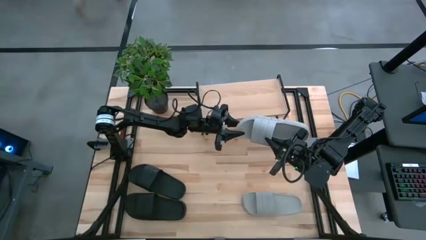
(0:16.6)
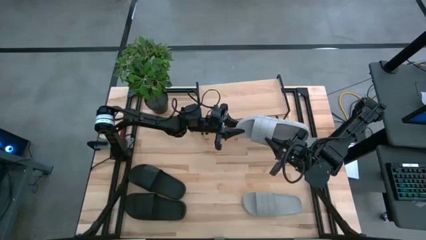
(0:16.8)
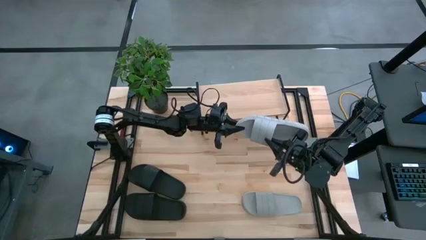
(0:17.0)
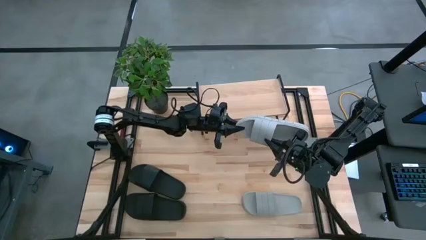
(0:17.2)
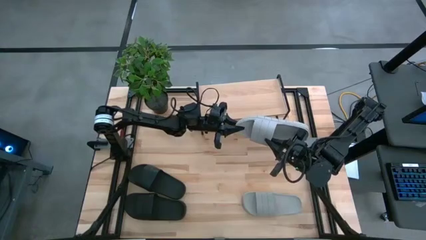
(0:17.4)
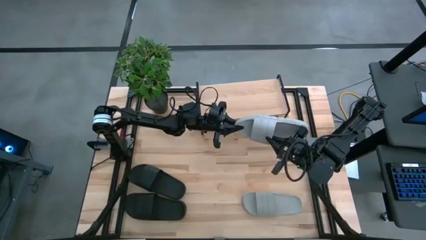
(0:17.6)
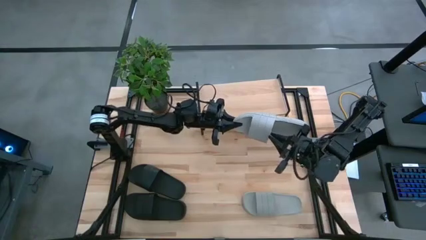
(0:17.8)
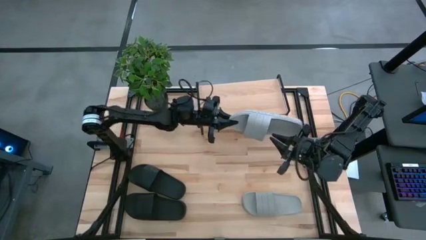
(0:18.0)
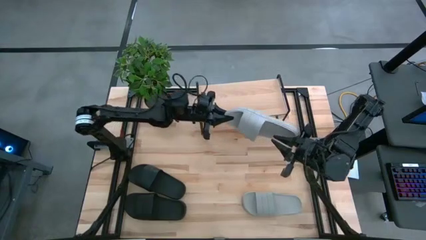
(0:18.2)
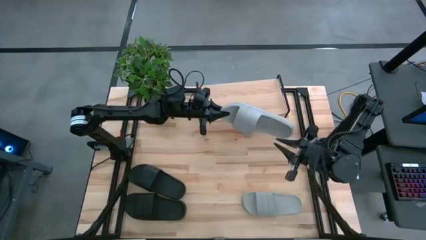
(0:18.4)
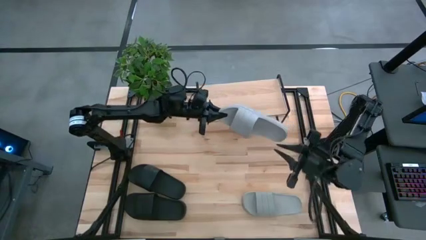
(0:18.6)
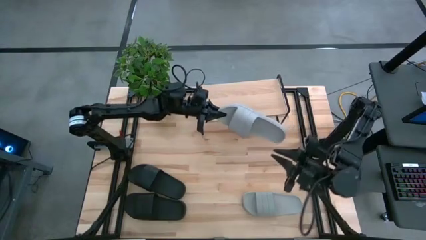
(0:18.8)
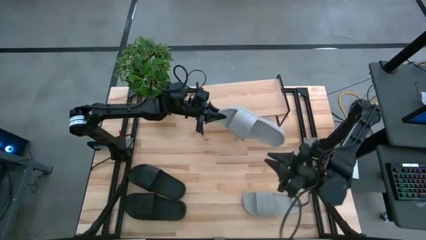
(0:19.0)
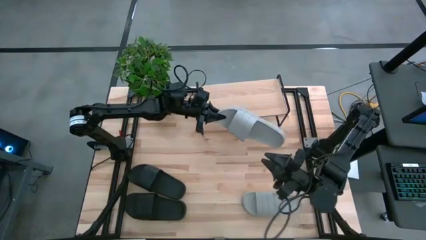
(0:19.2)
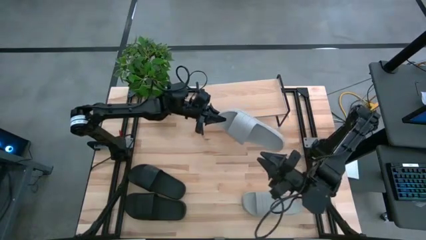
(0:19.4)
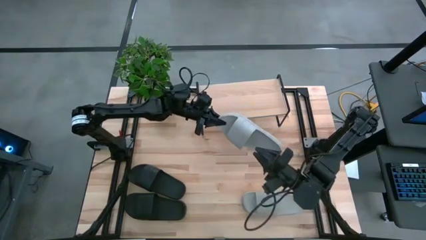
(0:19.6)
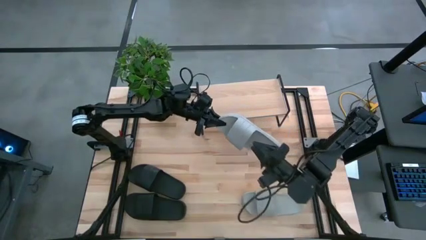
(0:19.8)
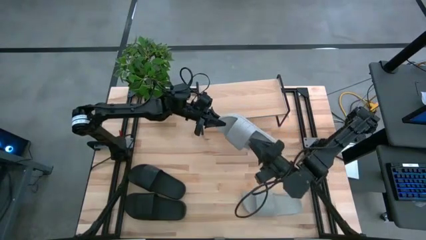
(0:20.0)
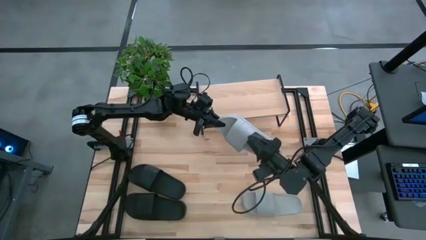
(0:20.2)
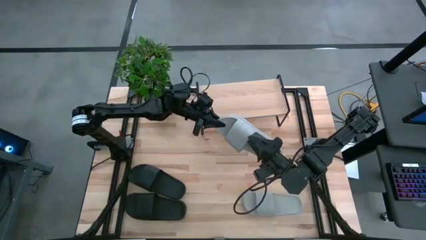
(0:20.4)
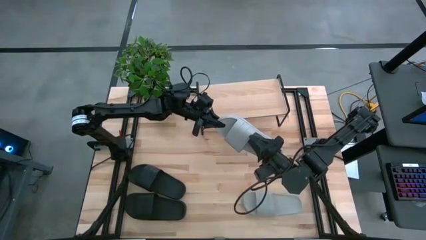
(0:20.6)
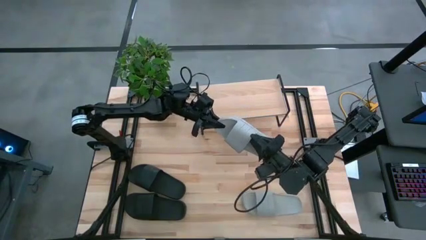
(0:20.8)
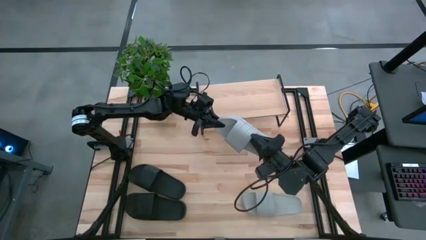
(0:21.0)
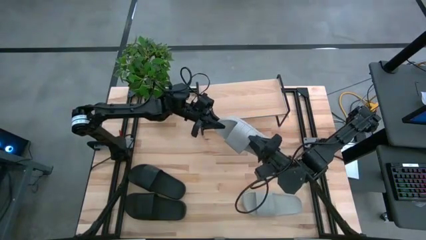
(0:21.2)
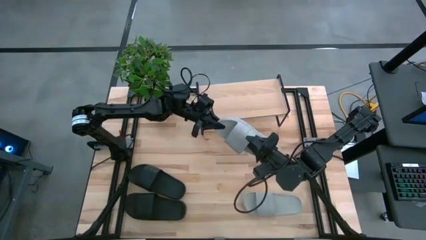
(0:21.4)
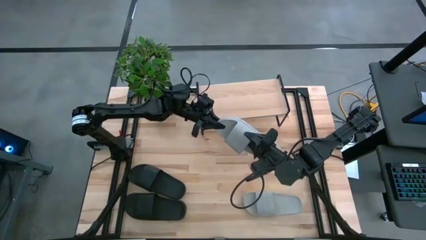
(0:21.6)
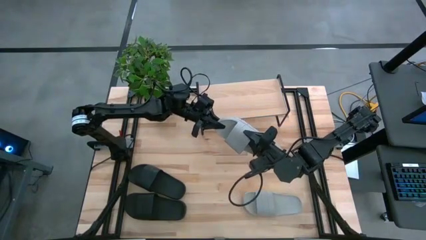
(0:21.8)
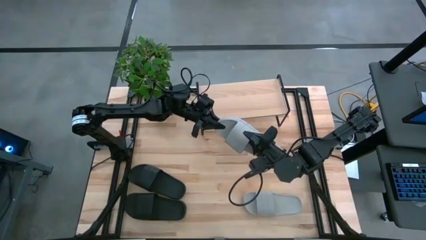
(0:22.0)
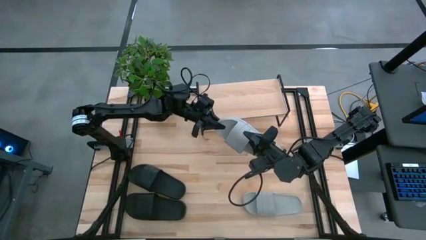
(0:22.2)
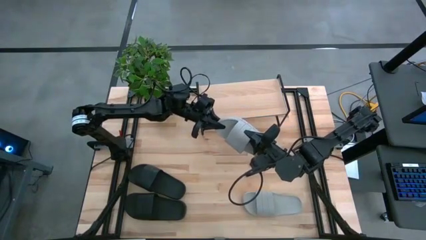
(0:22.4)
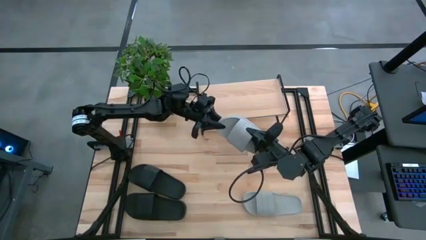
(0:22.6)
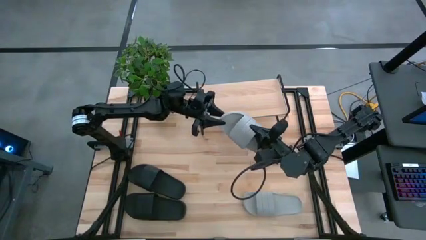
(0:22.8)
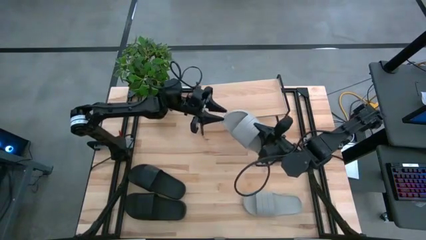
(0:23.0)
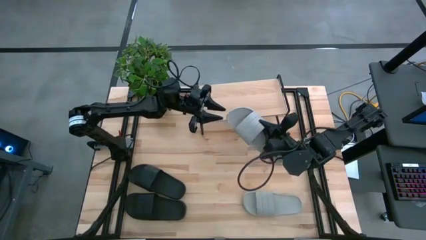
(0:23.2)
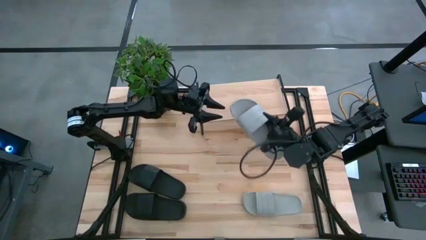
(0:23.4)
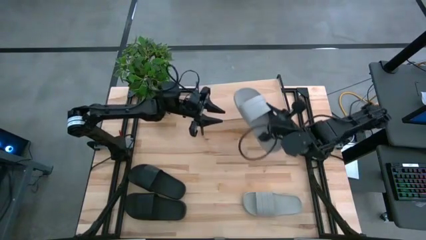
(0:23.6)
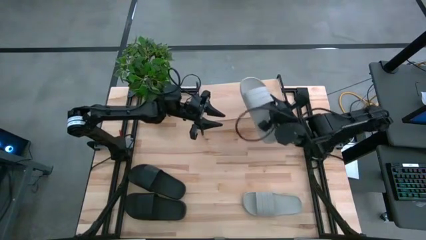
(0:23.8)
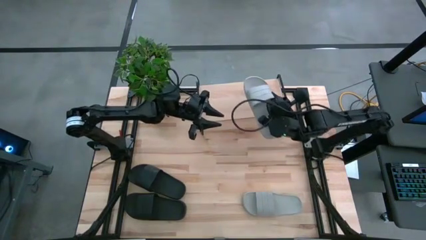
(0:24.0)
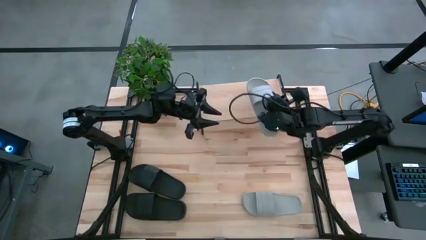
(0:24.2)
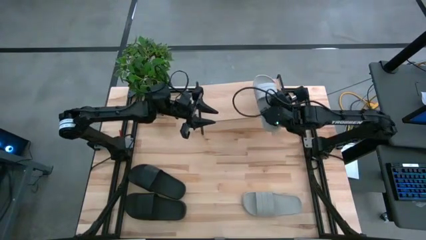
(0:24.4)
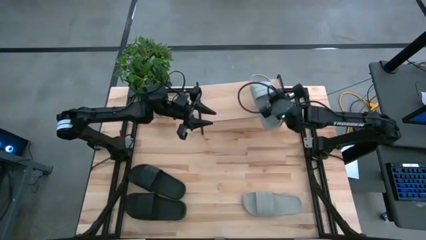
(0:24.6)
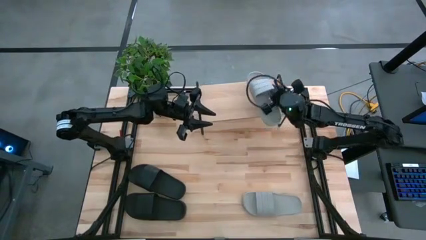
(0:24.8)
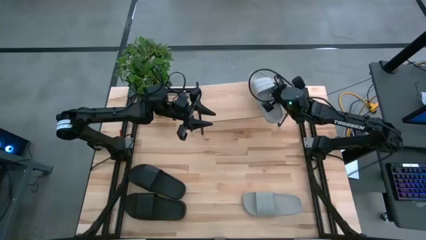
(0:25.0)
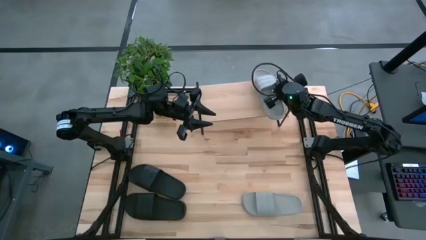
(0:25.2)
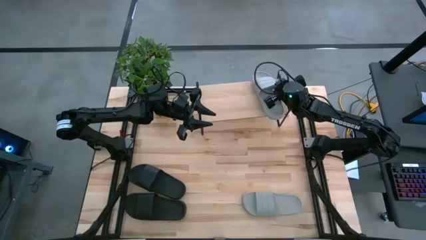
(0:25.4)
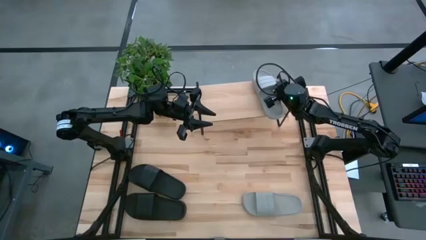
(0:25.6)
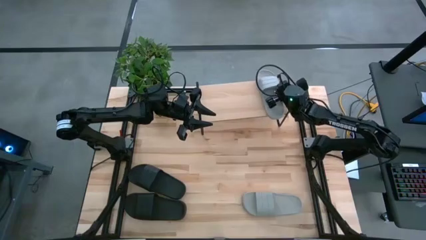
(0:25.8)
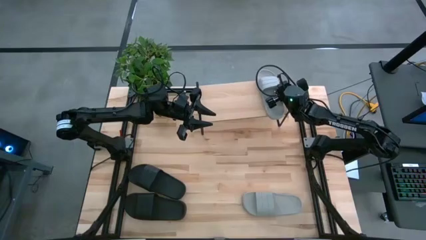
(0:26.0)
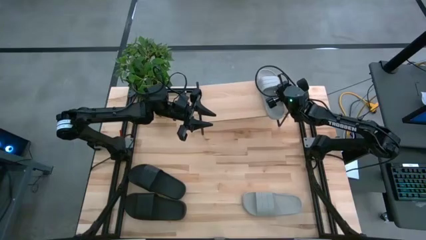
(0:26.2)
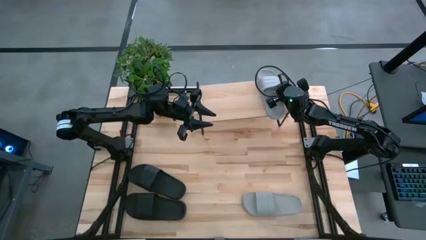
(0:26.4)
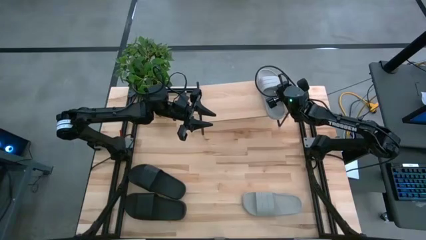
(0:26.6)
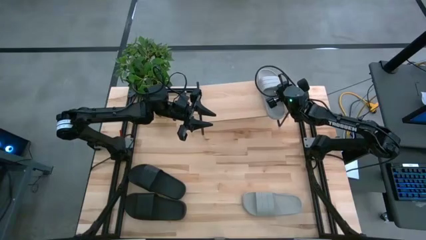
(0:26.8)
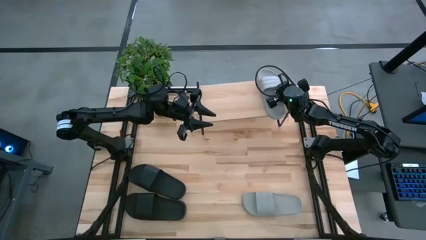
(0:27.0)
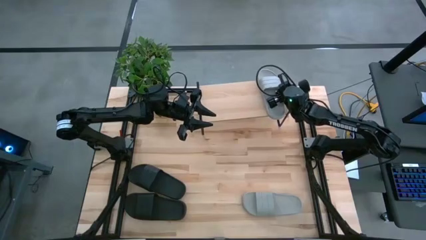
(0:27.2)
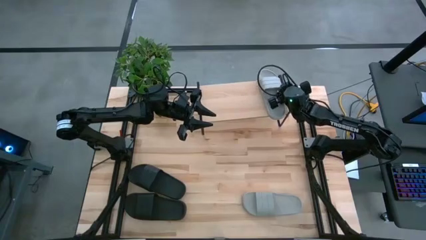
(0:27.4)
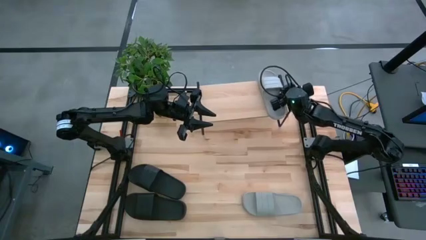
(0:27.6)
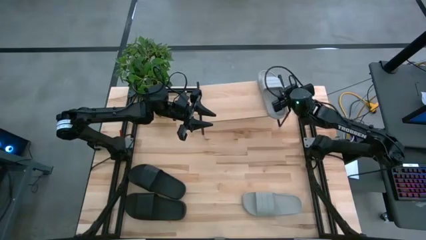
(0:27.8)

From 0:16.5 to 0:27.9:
Task: Pick and place slides into the shelf
Put the top gray slide on the shelf

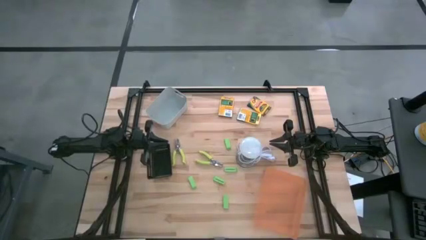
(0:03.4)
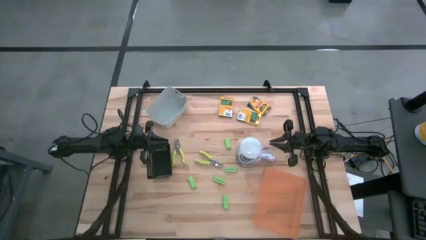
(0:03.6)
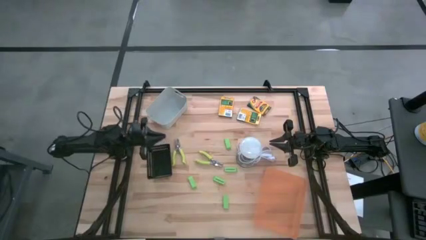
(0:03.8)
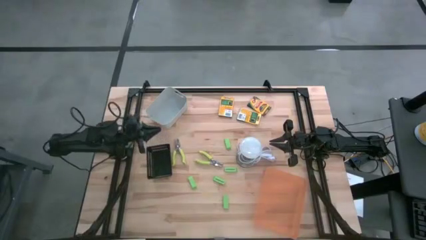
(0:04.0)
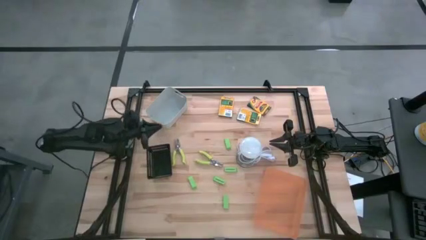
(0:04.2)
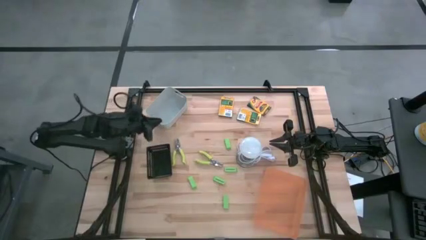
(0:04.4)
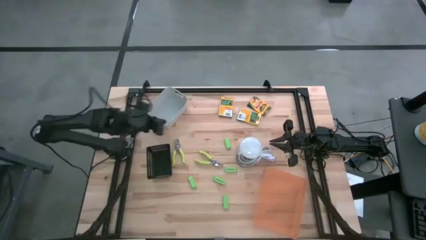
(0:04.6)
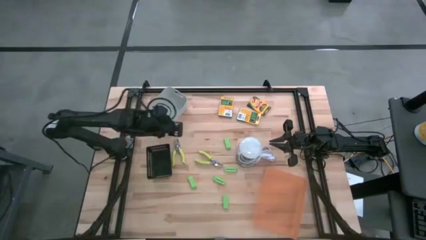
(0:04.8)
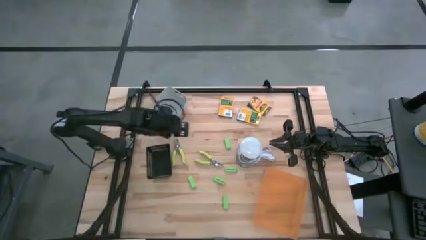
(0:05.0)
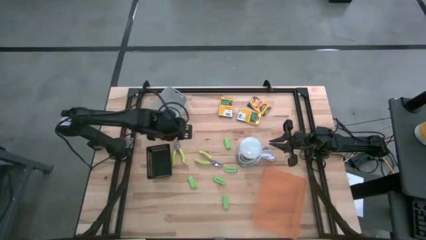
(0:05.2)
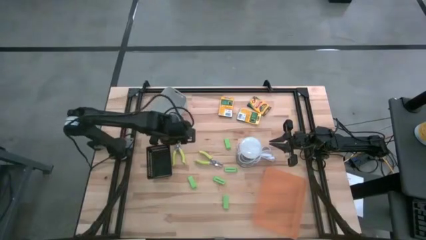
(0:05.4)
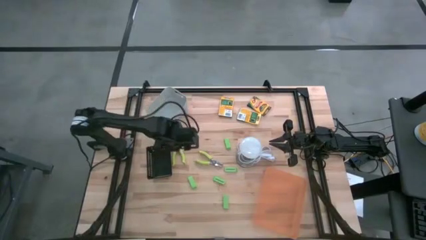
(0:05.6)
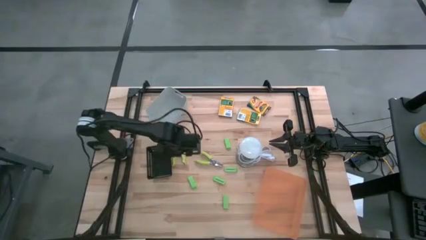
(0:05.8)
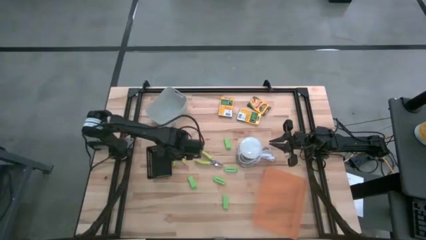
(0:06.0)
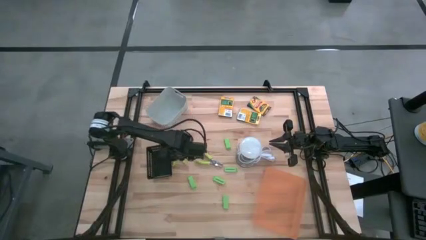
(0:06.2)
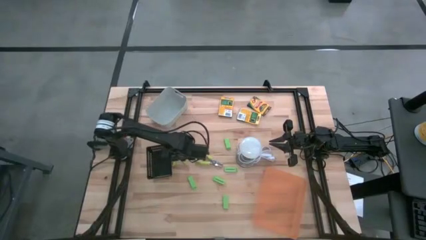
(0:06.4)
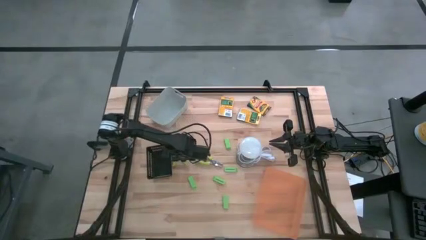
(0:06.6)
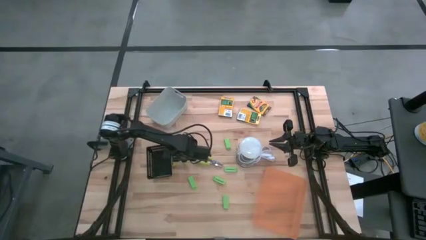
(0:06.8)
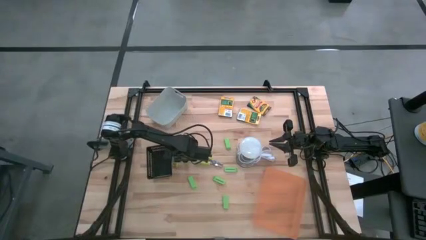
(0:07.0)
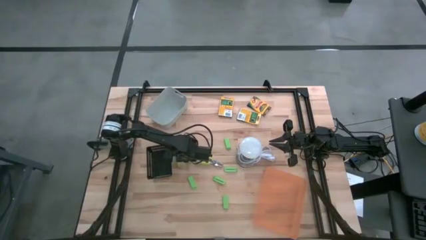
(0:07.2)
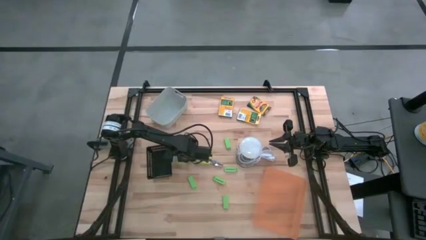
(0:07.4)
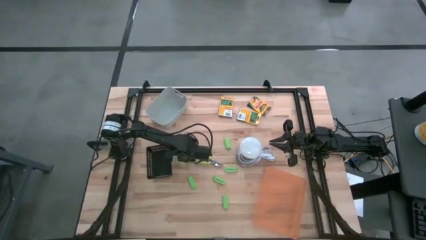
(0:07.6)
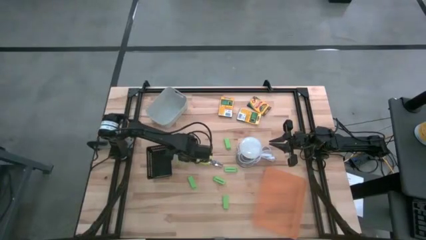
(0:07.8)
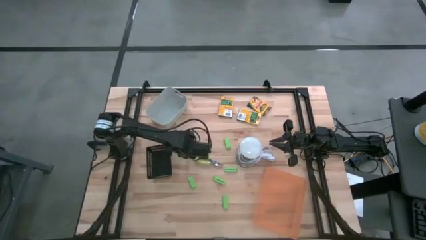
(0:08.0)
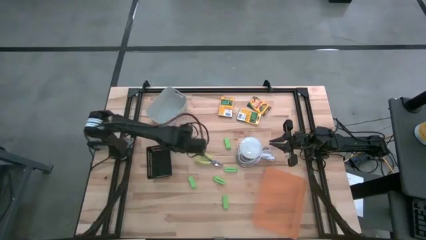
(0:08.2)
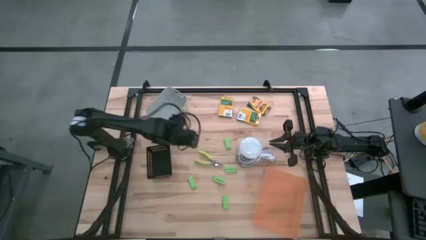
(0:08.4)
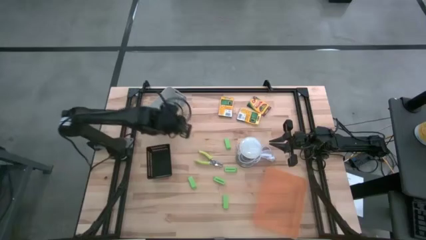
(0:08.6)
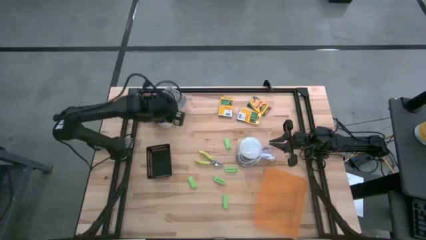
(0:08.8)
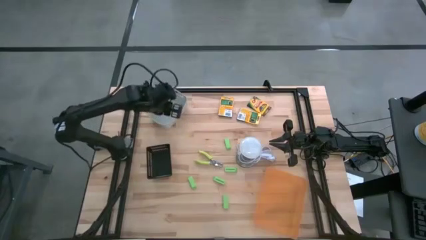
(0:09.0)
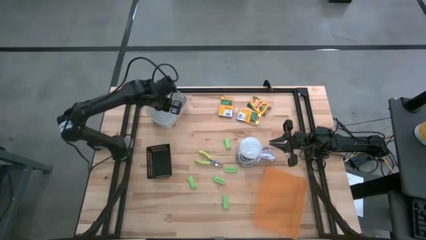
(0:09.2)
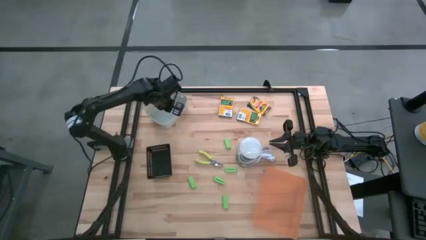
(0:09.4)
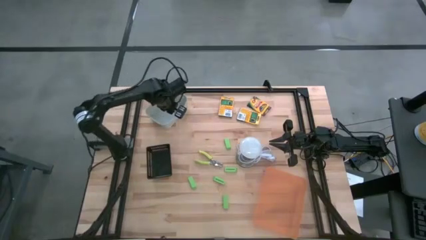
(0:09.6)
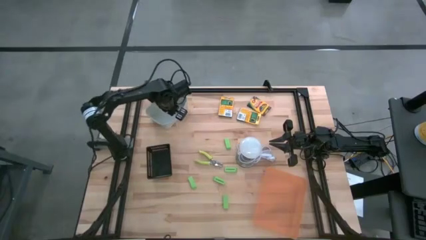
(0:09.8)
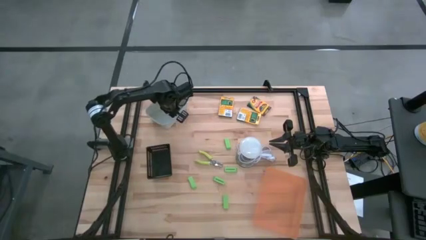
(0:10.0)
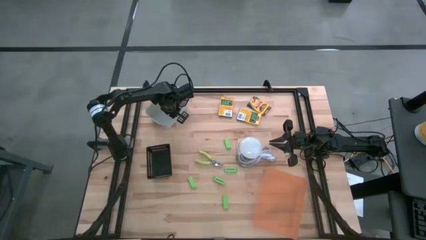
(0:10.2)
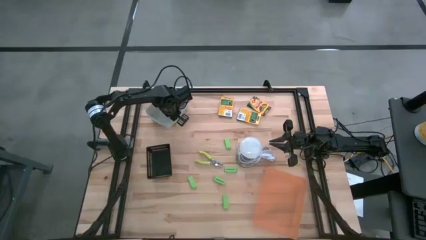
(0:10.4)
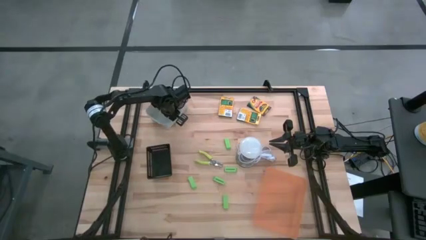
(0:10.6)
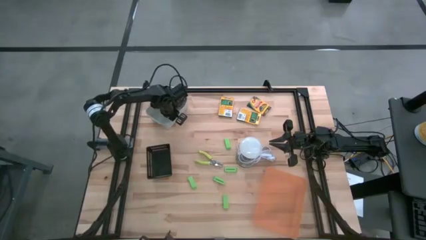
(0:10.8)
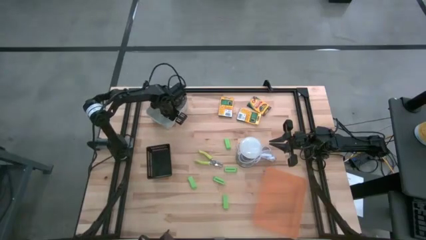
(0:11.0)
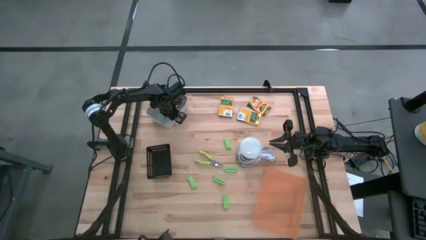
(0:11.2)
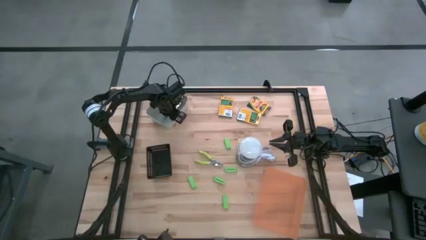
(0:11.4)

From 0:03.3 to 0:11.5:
Task: Pick & Place School Supplies
Put the green hole puncher into the gray bin
